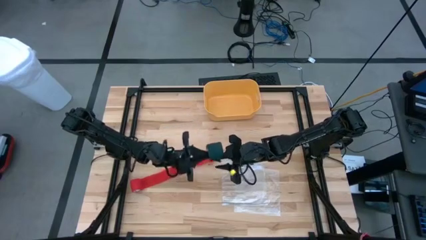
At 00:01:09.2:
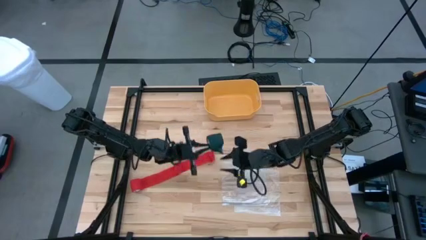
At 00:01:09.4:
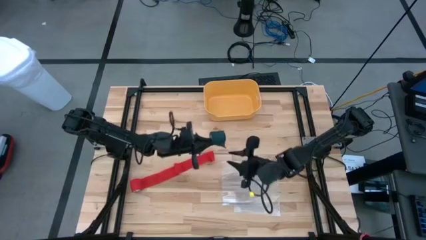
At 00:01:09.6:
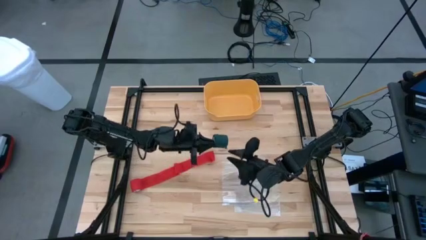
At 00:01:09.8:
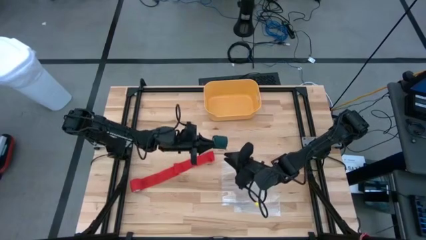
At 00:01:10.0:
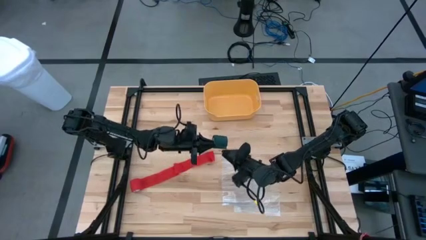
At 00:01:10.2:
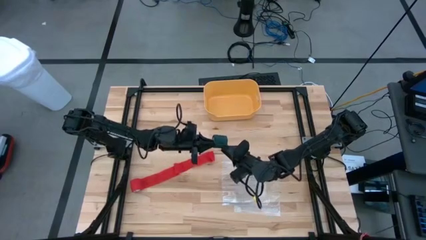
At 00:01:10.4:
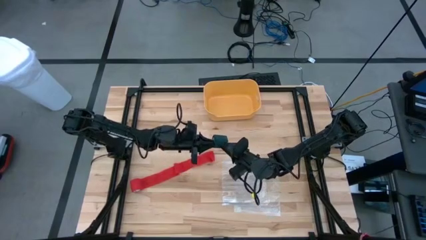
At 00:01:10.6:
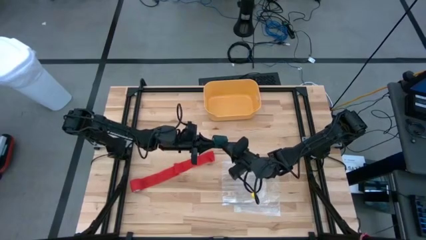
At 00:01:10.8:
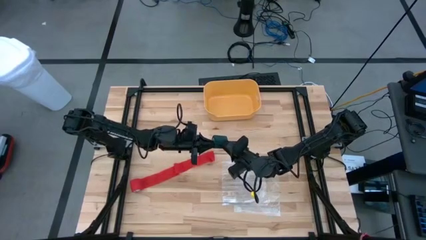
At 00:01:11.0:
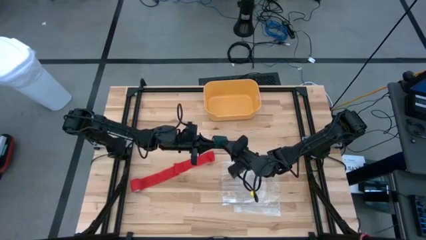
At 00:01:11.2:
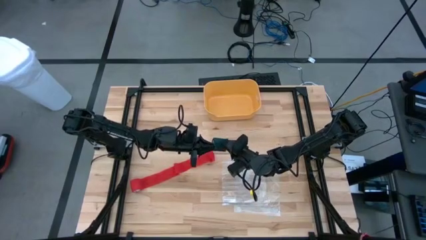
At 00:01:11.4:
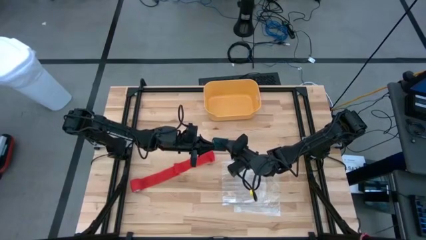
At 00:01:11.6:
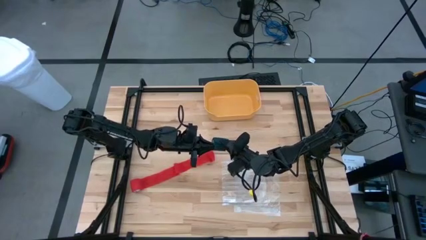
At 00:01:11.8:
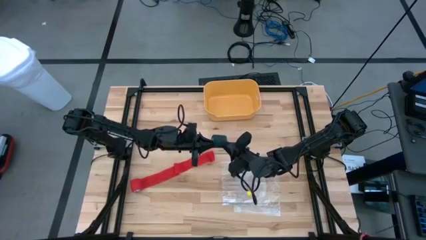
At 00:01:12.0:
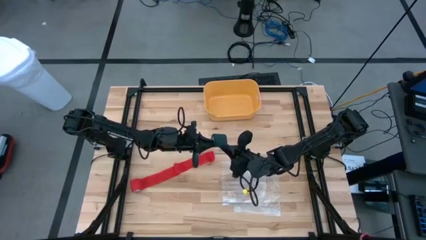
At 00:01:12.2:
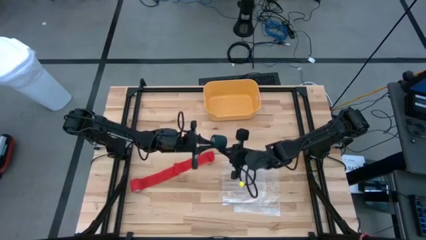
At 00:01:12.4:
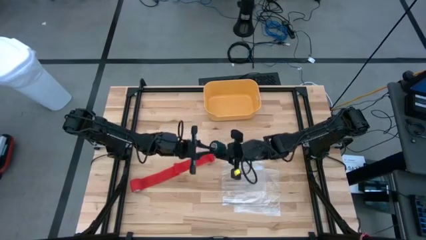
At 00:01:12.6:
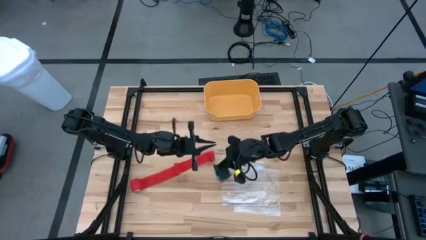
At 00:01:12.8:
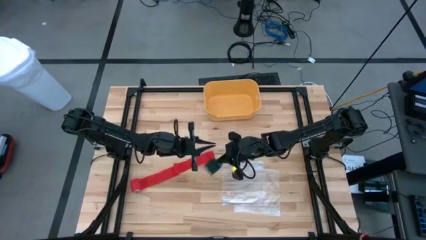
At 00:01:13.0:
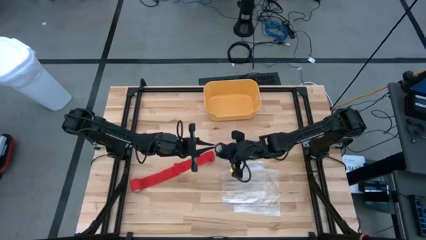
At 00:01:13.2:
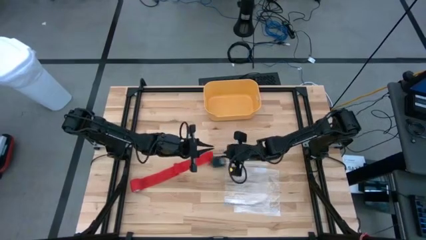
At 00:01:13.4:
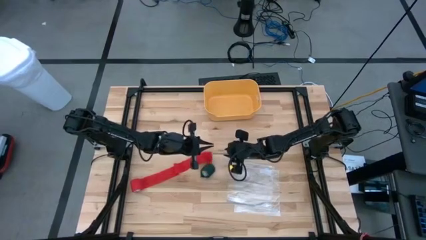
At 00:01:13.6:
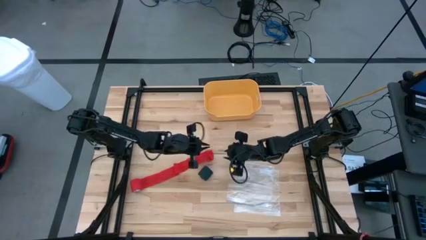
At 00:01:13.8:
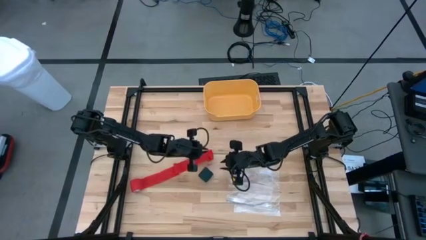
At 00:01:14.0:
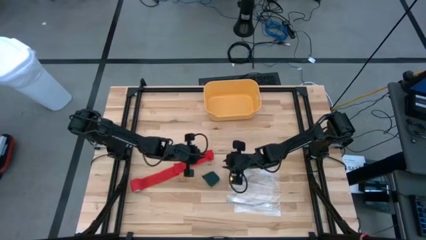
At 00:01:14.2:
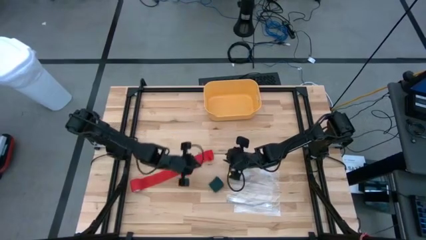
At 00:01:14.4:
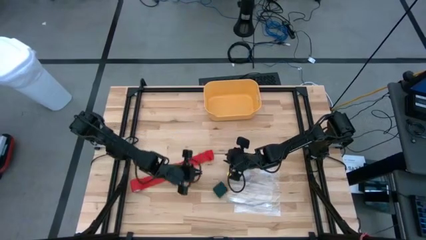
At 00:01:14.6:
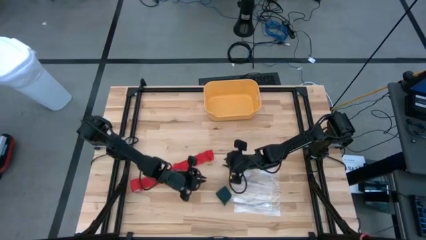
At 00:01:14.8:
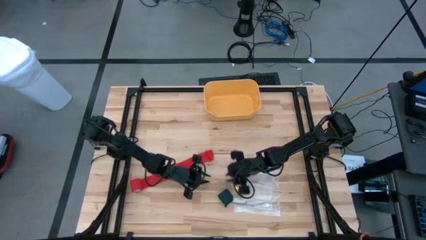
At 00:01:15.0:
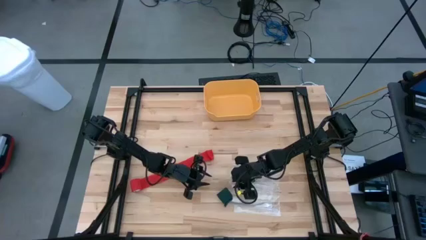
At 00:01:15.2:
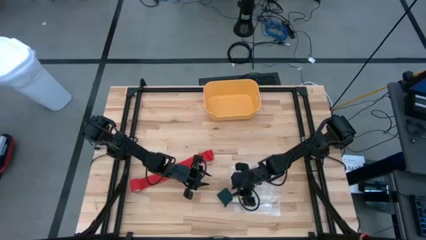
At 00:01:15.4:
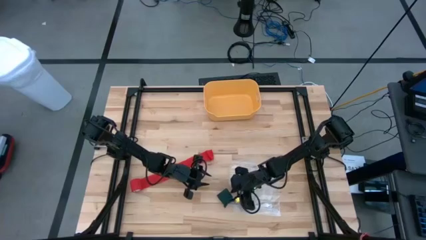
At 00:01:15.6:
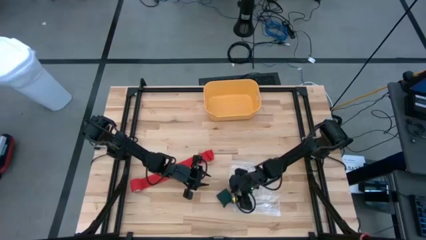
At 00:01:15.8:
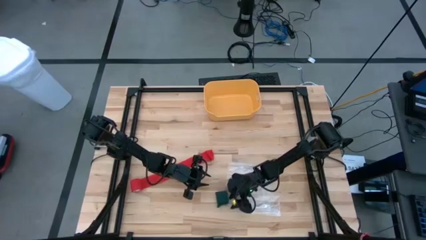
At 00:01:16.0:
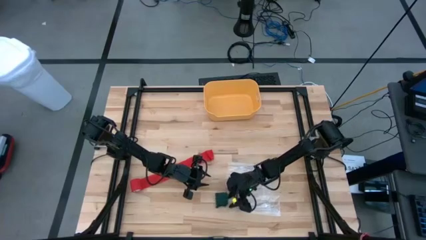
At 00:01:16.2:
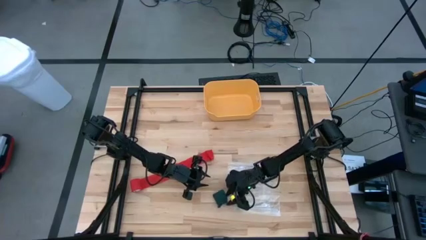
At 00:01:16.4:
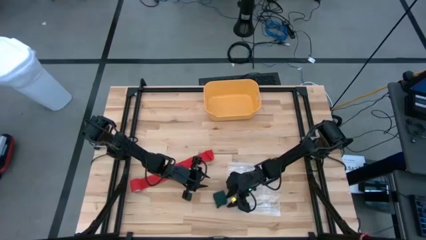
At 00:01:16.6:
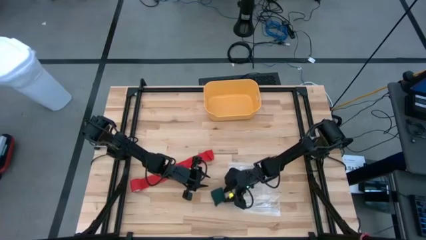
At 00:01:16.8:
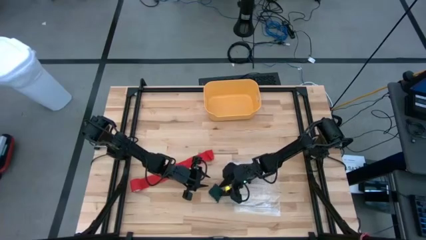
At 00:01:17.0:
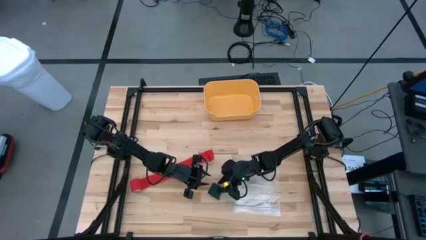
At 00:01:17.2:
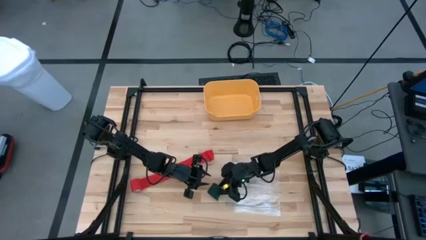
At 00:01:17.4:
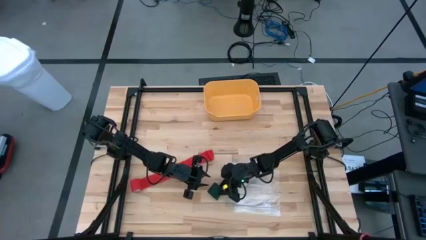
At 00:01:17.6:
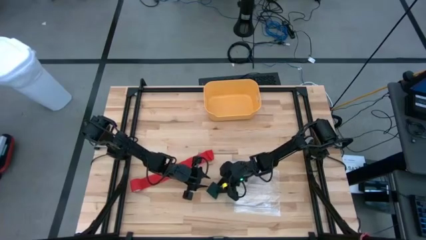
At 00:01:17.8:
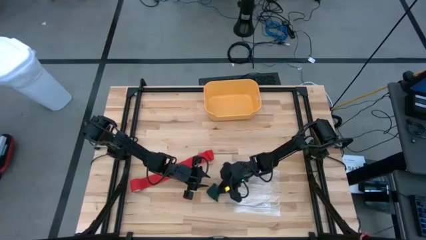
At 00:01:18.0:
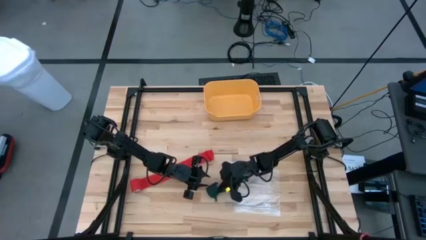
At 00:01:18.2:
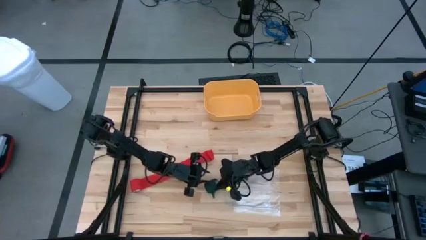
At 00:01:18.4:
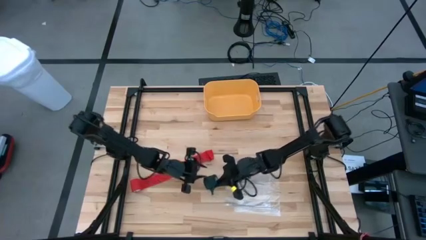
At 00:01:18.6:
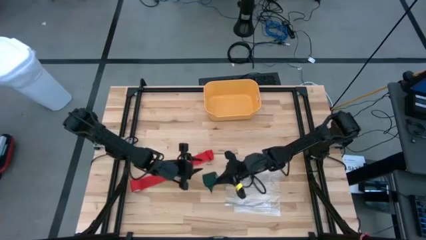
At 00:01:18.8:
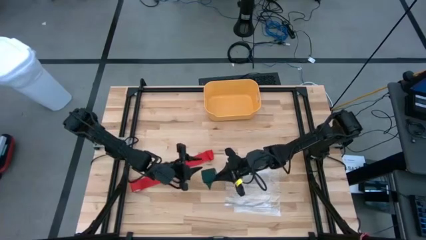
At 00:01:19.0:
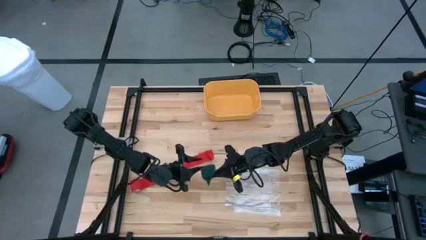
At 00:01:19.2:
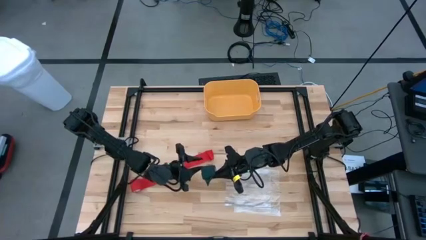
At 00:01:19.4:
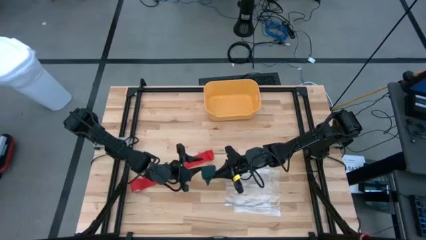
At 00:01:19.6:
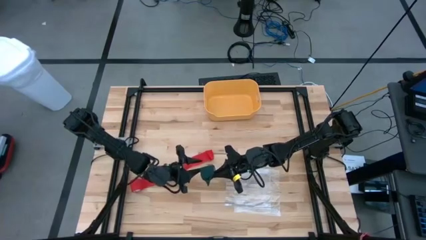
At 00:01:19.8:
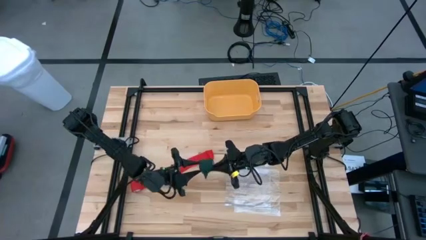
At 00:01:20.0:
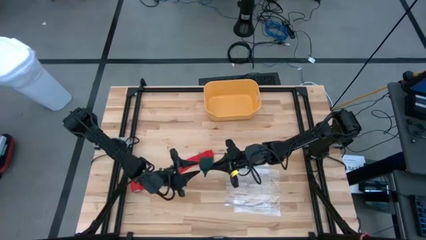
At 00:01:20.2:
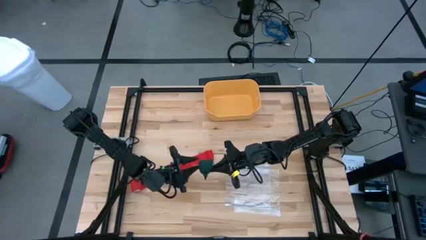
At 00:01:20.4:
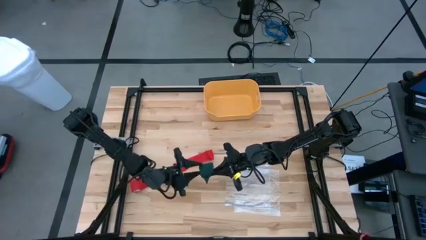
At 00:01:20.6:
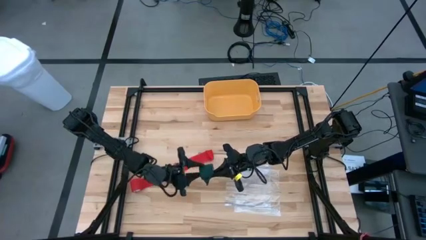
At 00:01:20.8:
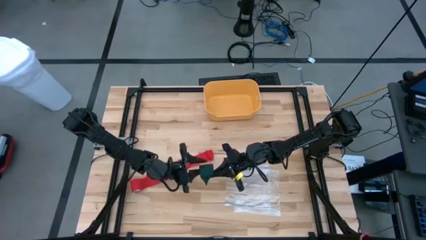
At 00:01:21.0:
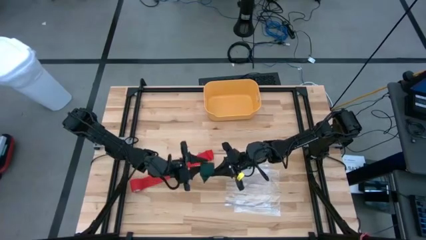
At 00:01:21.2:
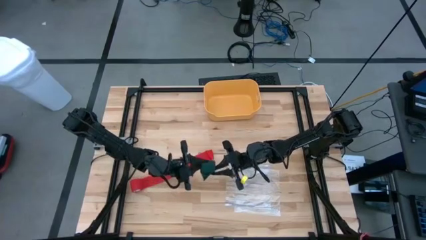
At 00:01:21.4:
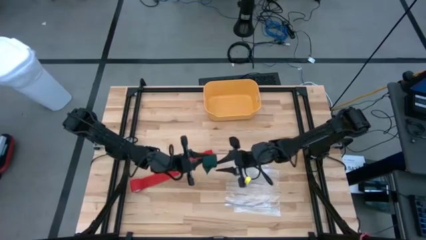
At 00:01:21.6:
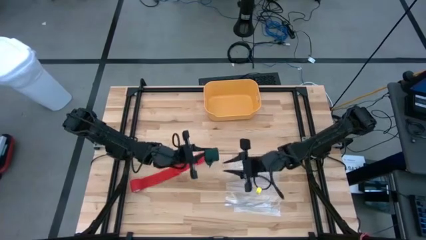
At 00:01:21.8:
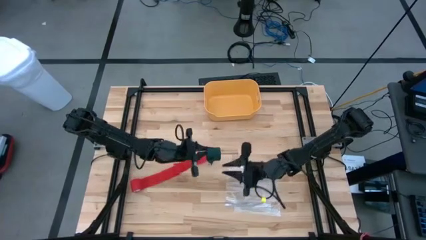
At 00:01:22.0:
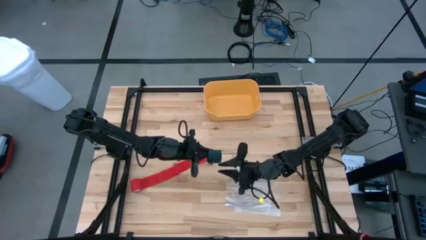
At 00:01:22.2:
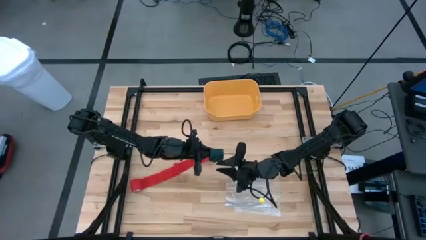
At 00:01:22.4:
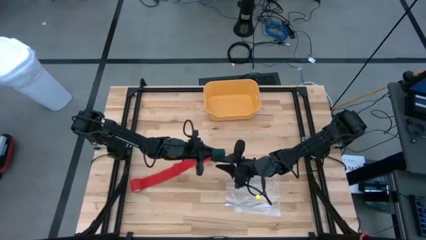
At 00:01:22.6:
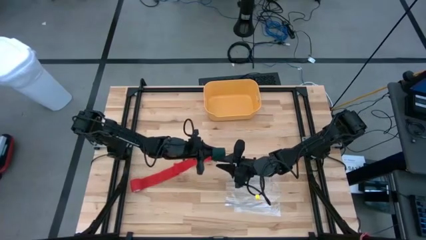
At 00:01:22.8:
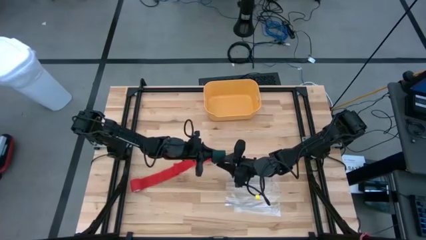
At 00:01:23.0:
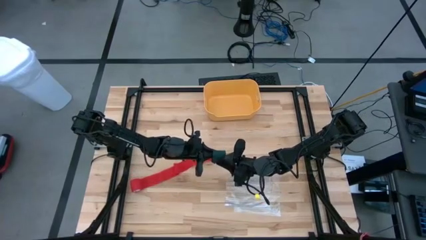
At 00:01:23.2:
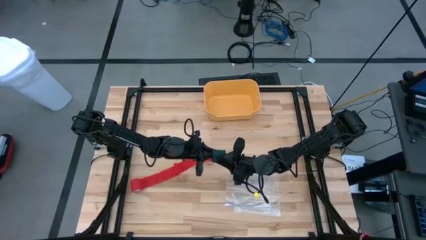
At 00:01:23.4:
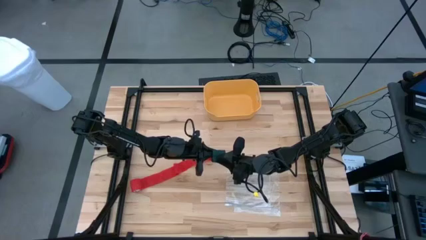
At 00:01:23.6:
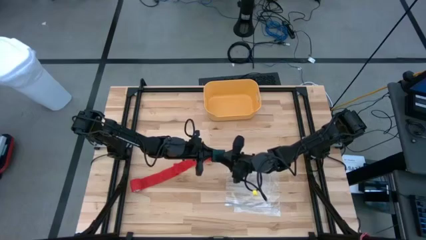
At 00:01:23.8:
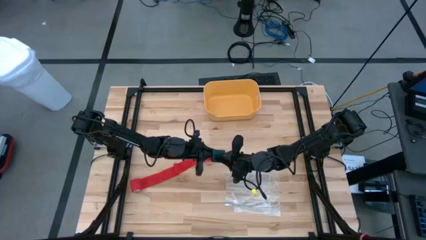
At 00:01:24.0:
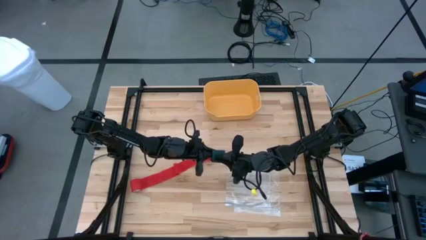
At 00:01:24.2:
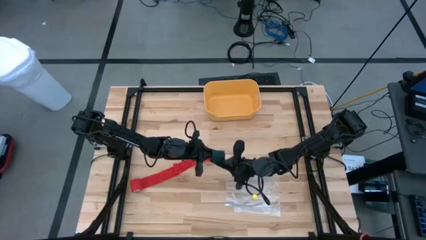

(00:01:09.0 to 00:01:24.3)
Task: Roll bandage
Roll the green bandage
